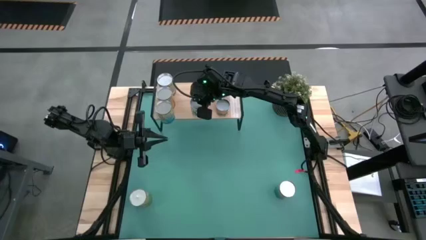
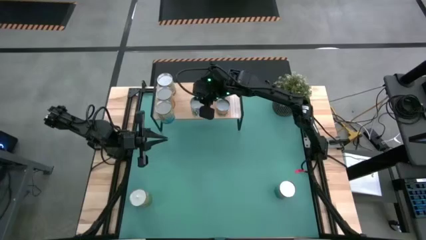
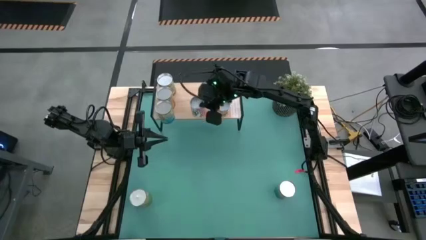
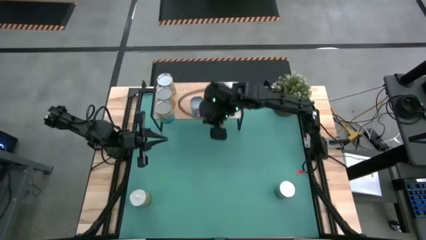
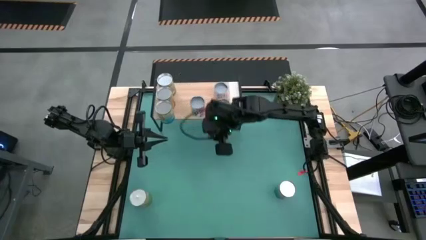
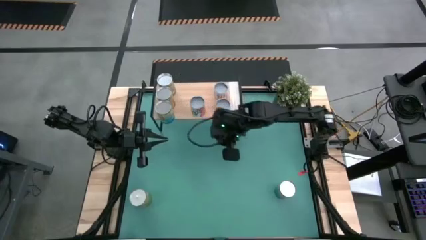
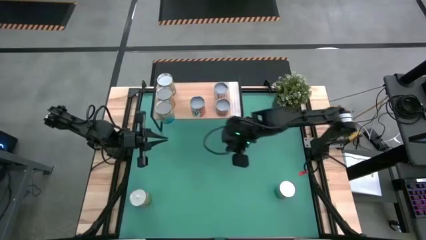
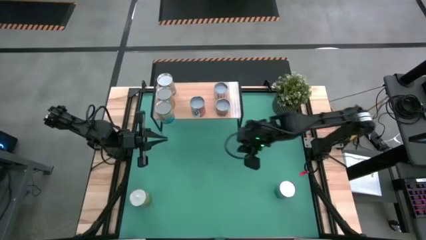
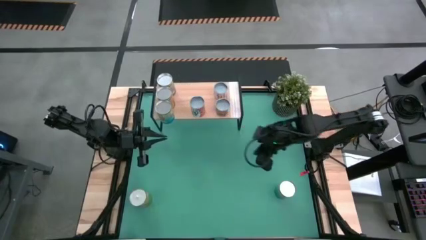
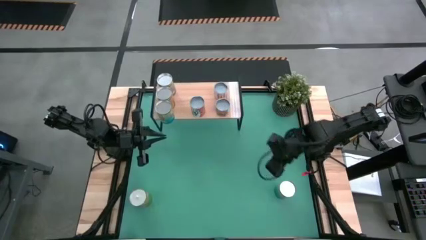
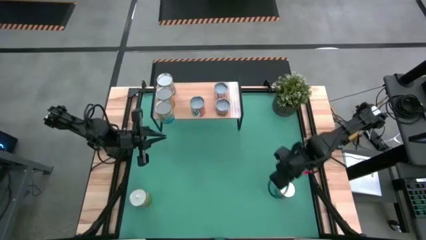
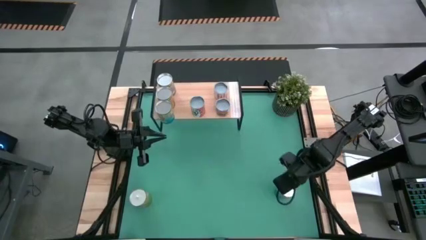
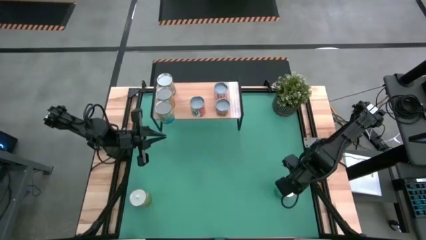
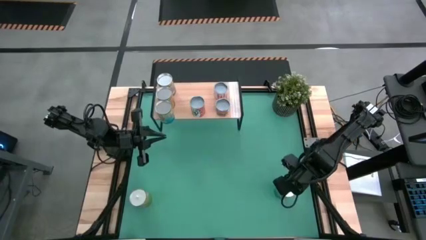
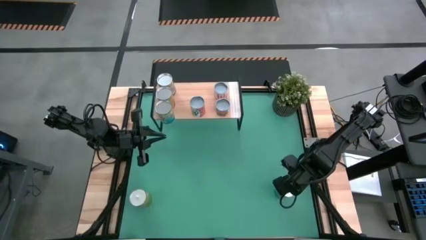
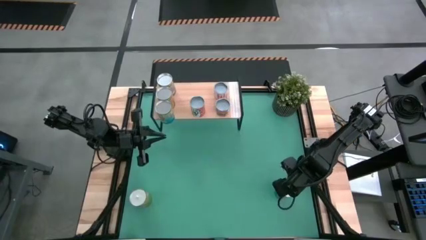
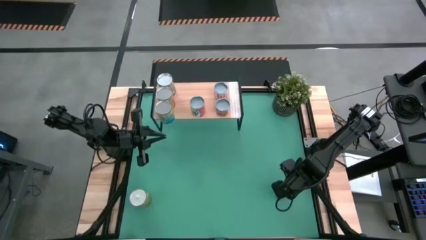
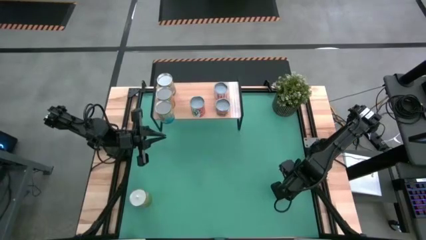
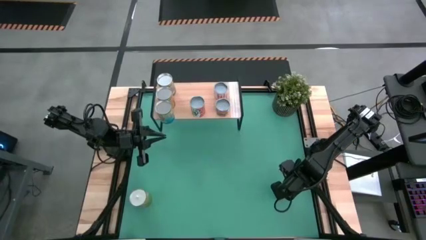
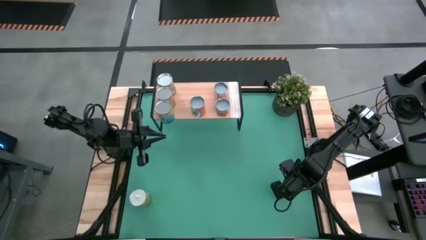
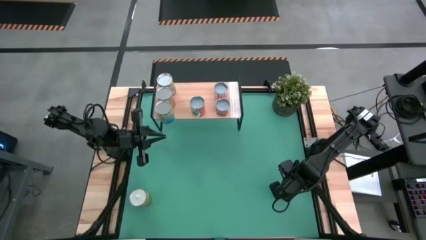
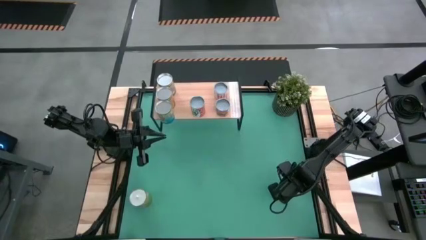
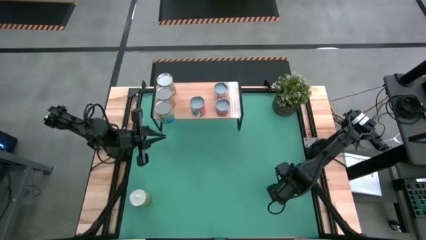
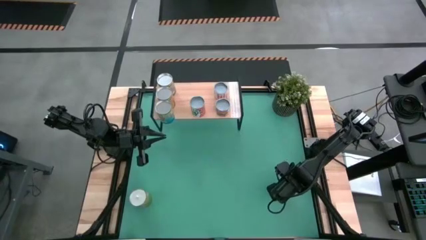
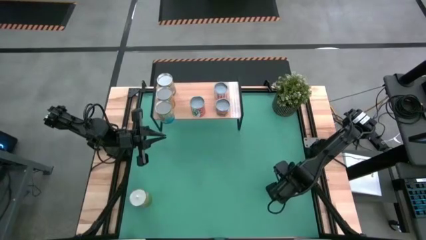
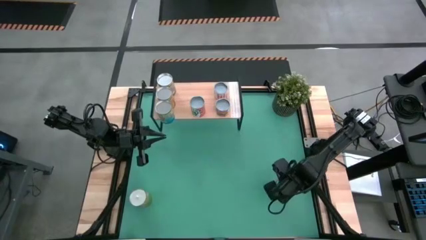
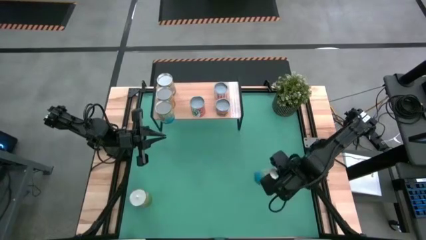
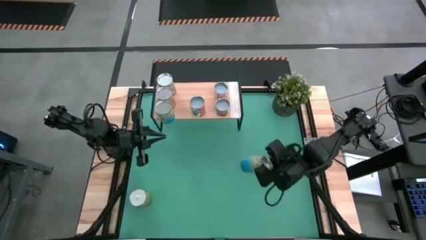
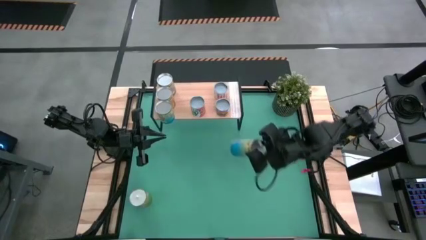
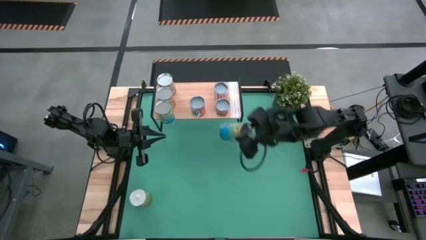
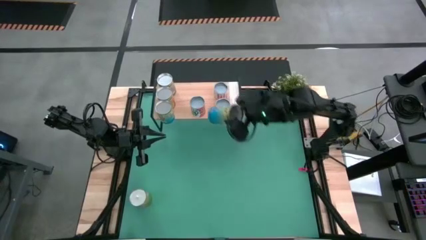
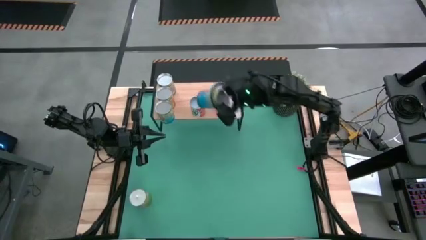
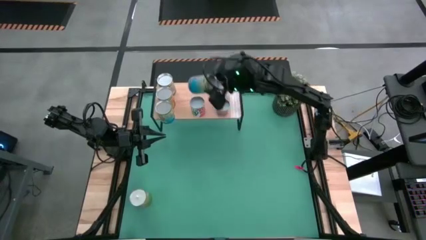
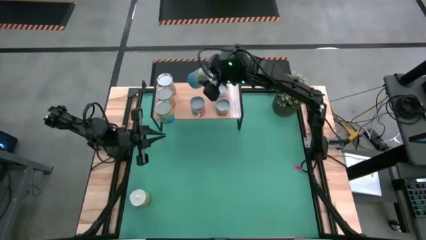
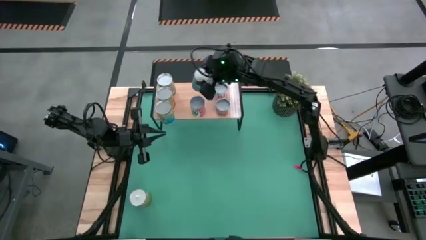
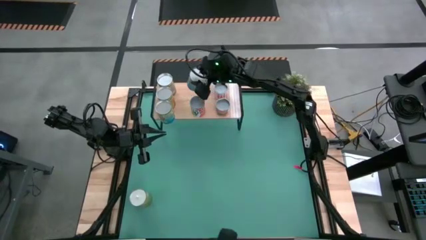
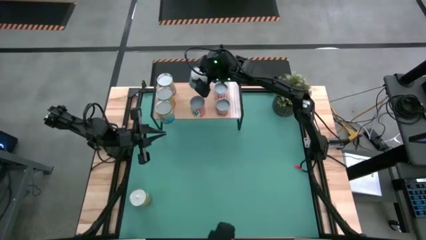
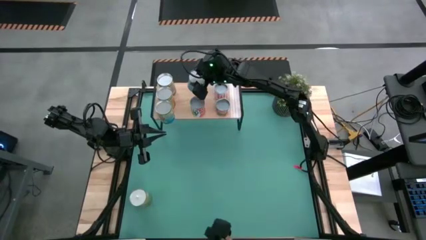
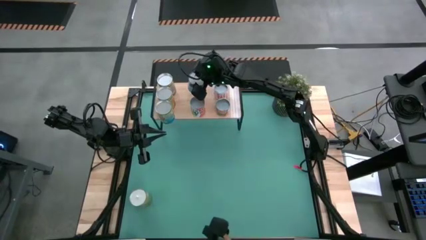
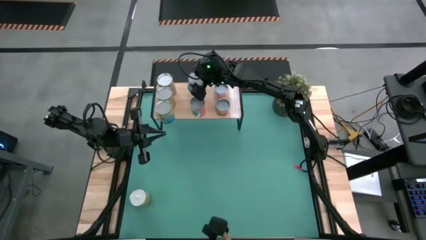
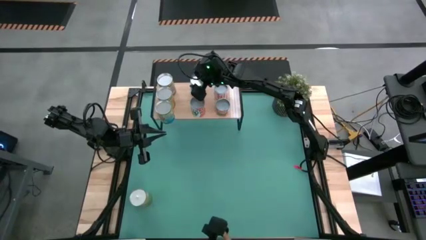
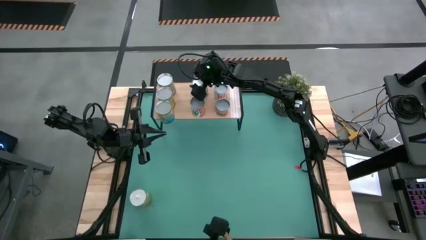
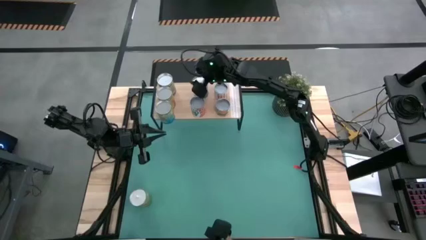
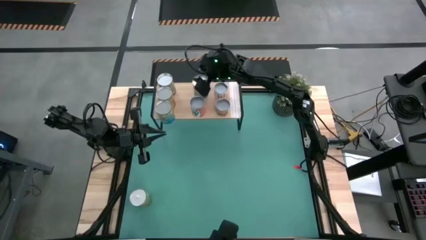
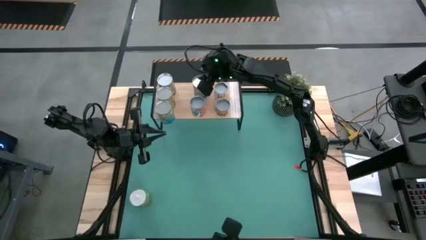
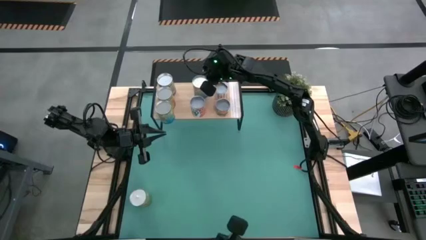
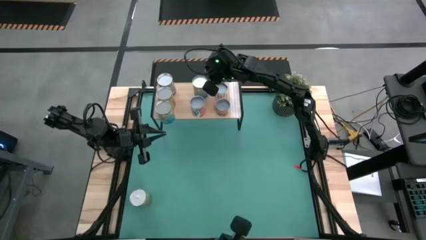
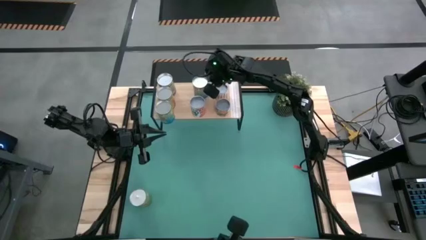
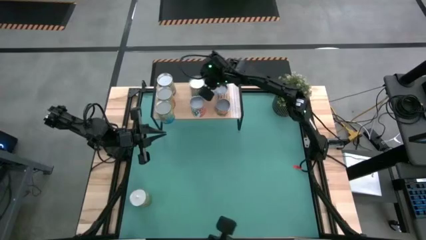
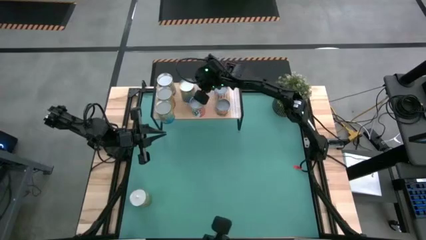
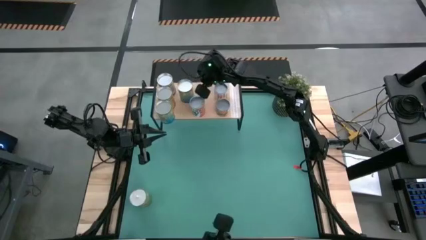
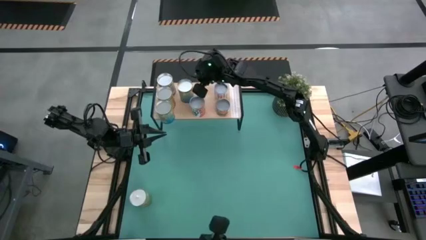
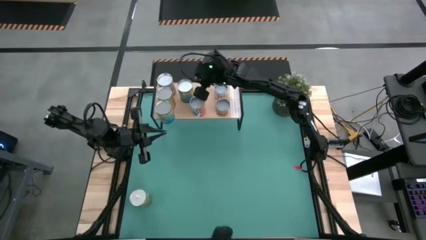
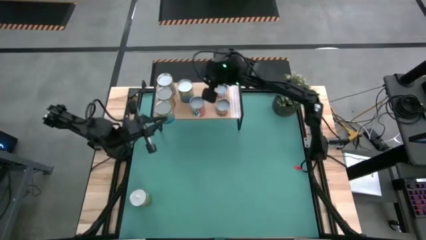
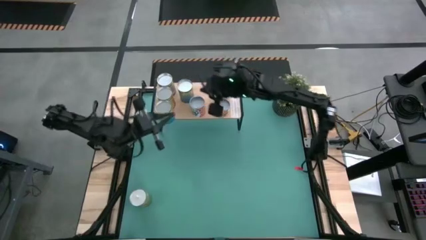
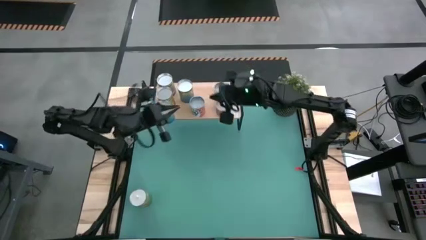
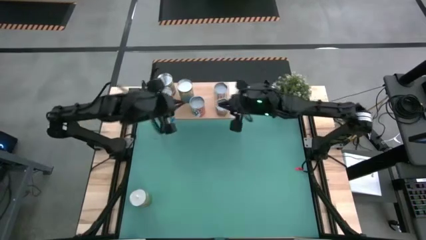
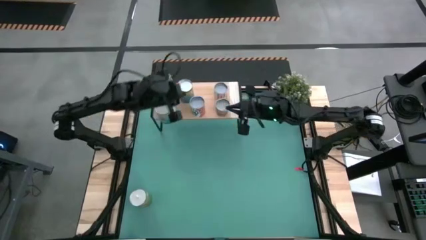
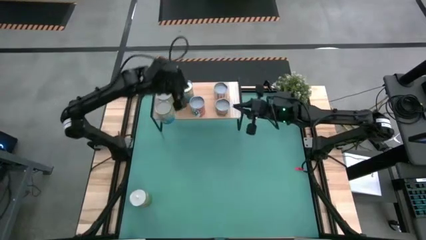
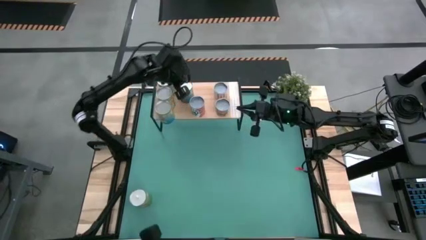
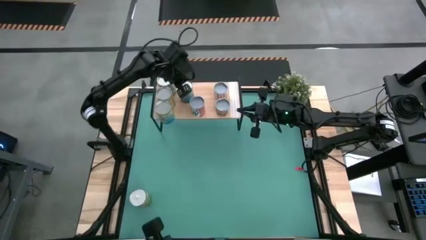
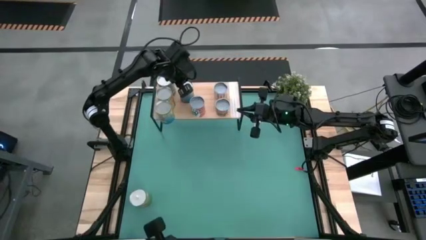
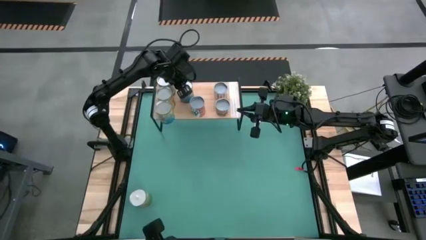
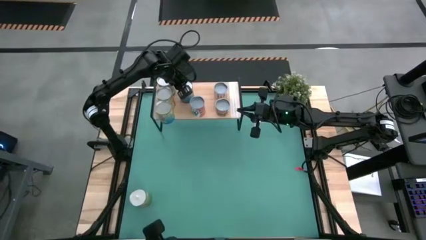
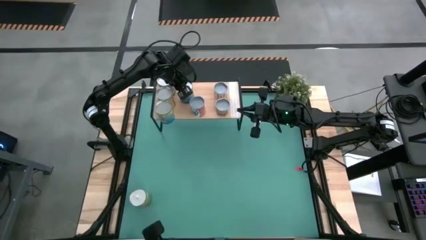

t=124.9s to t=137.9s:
Task: Pick and place cans onto a shelf
Put the canned cherries on the shelf
